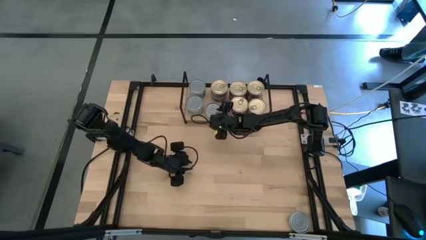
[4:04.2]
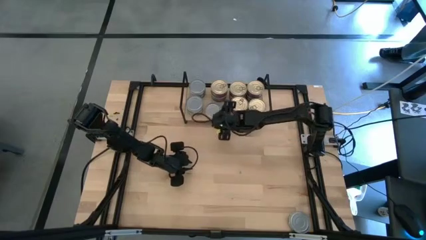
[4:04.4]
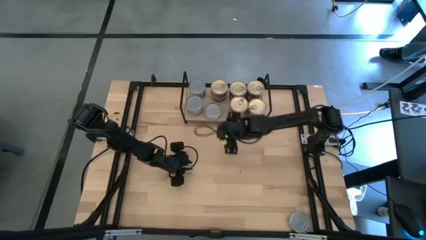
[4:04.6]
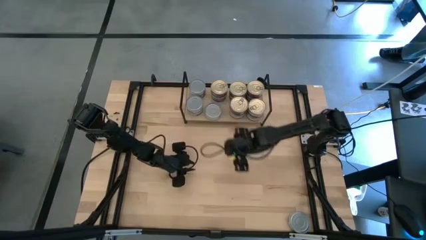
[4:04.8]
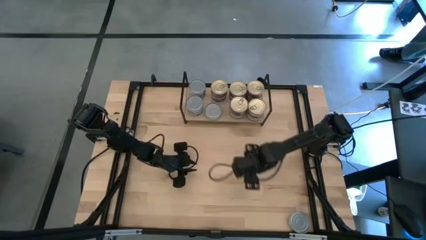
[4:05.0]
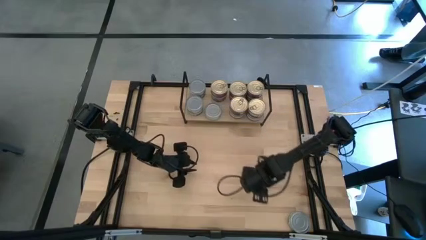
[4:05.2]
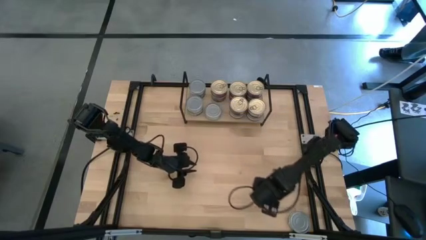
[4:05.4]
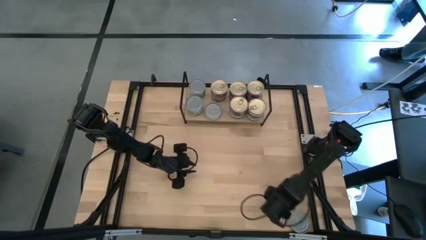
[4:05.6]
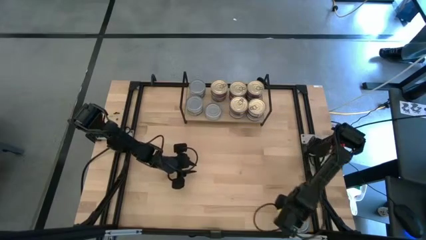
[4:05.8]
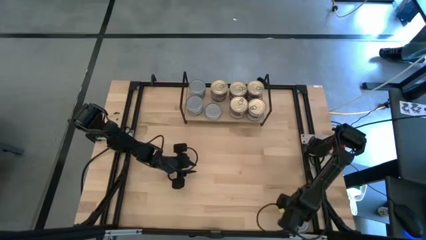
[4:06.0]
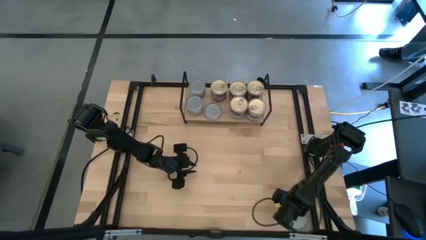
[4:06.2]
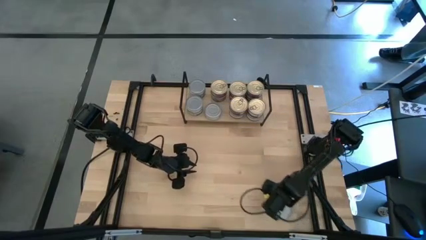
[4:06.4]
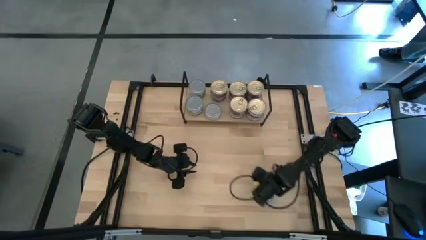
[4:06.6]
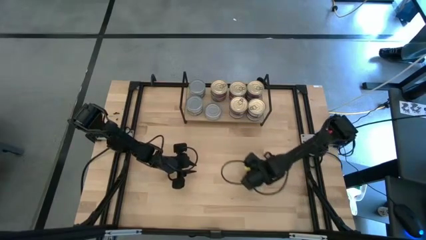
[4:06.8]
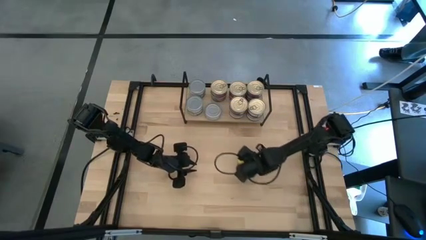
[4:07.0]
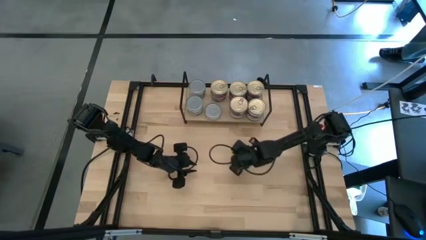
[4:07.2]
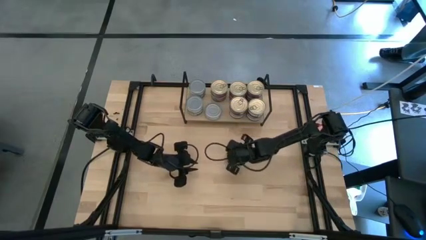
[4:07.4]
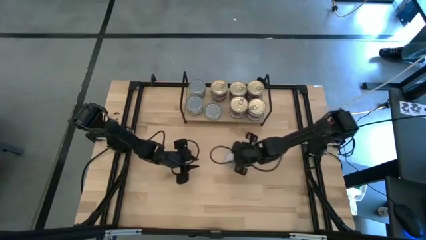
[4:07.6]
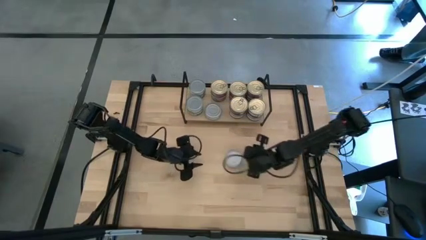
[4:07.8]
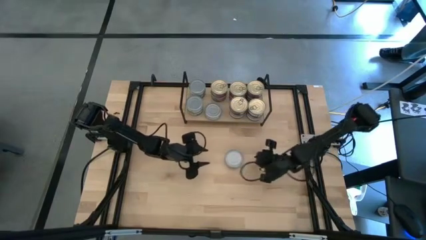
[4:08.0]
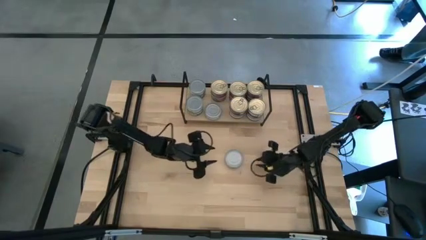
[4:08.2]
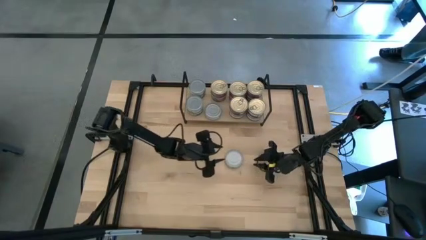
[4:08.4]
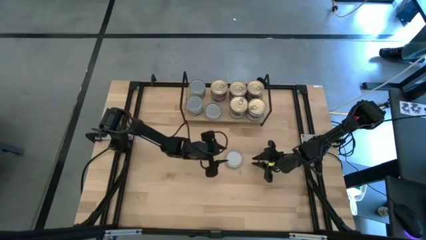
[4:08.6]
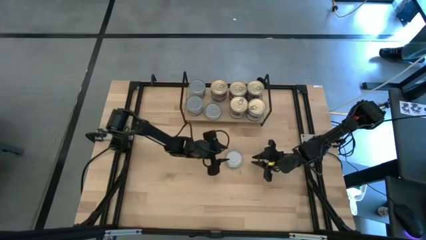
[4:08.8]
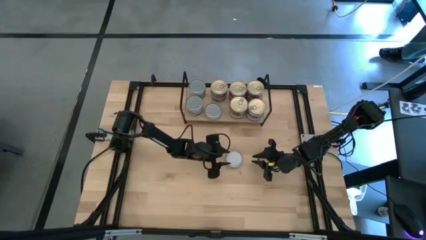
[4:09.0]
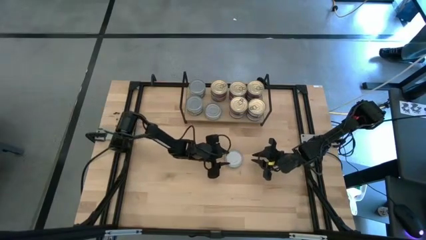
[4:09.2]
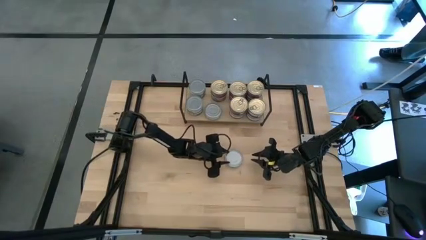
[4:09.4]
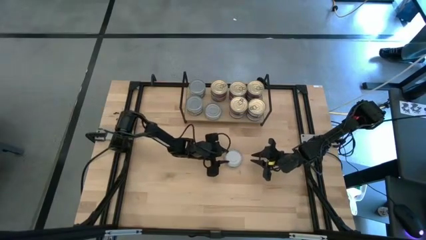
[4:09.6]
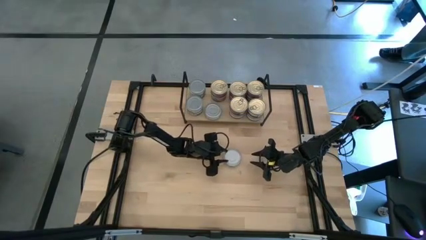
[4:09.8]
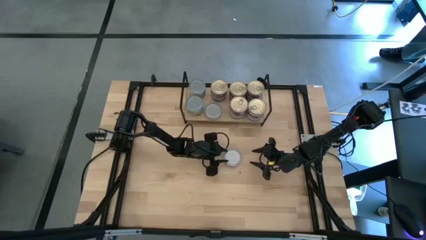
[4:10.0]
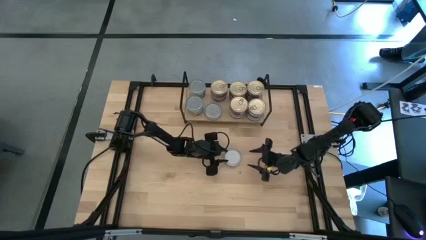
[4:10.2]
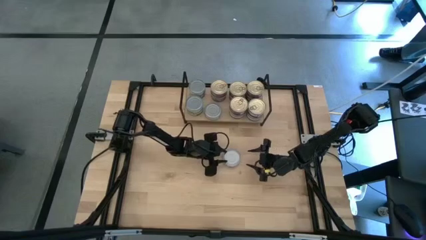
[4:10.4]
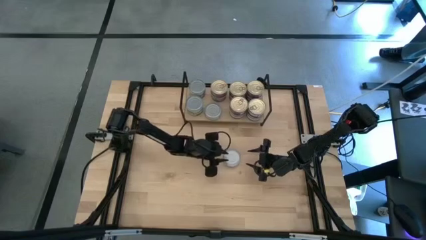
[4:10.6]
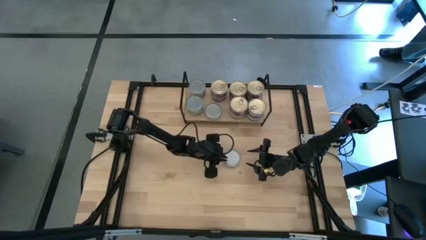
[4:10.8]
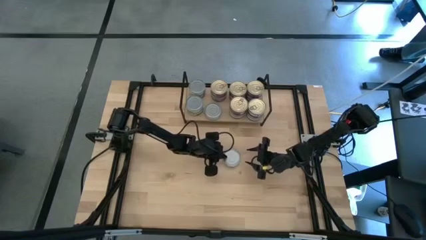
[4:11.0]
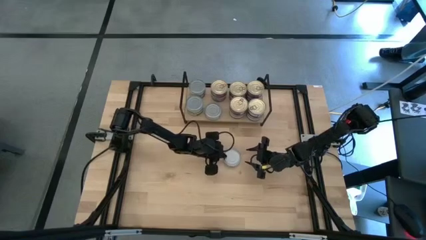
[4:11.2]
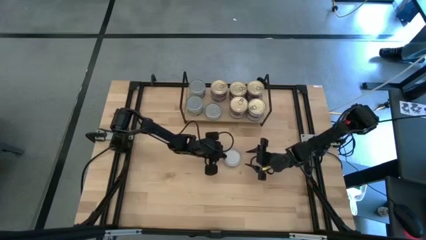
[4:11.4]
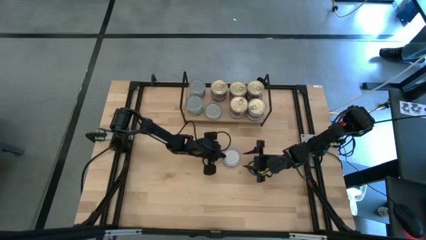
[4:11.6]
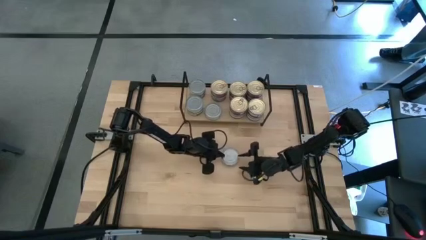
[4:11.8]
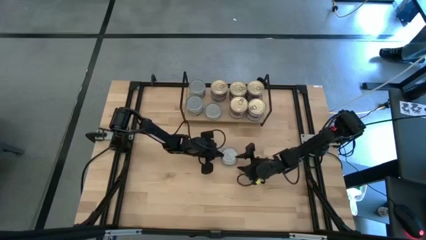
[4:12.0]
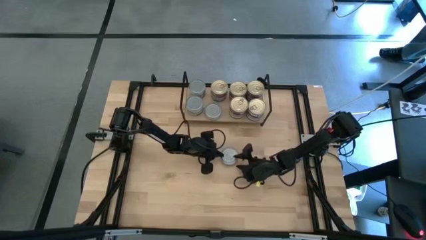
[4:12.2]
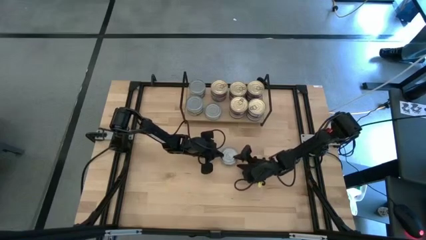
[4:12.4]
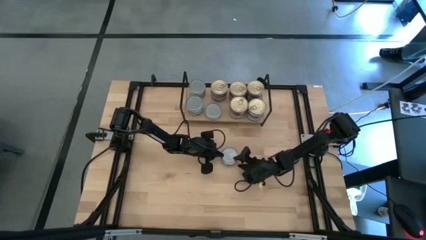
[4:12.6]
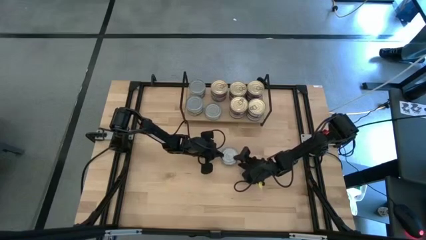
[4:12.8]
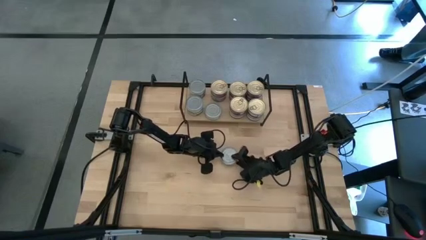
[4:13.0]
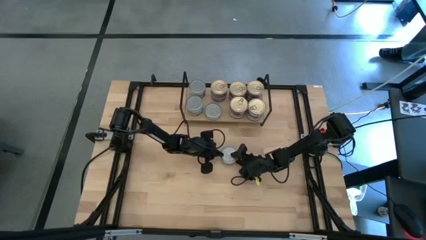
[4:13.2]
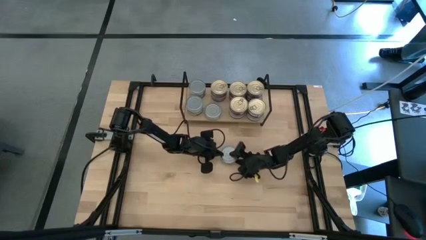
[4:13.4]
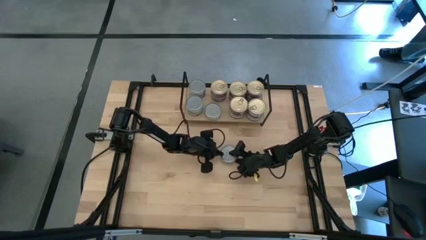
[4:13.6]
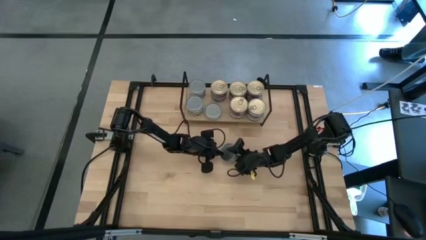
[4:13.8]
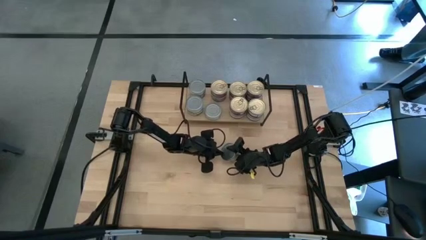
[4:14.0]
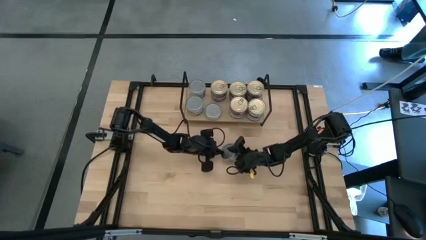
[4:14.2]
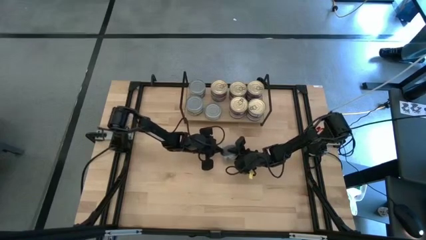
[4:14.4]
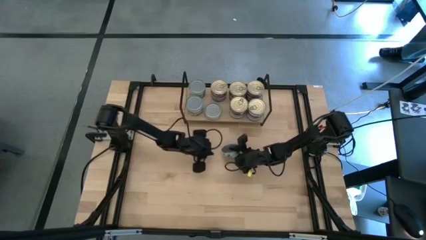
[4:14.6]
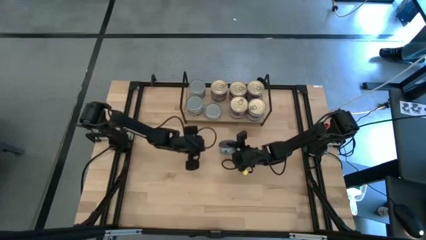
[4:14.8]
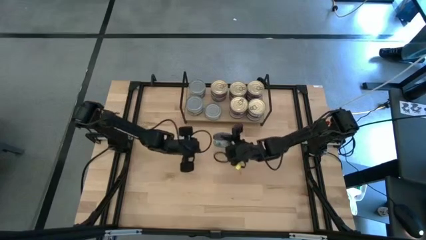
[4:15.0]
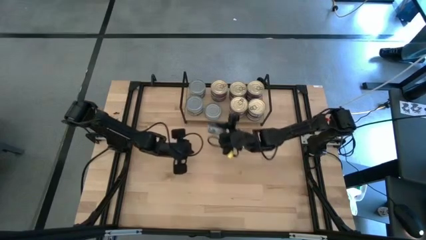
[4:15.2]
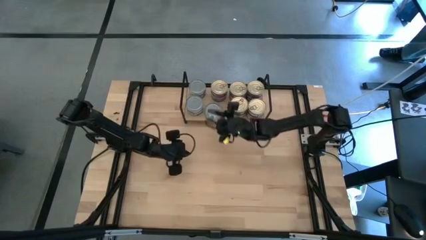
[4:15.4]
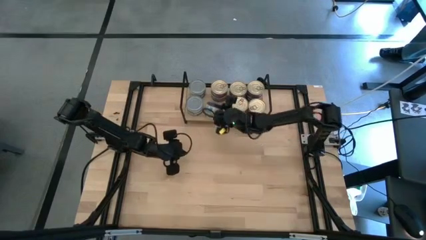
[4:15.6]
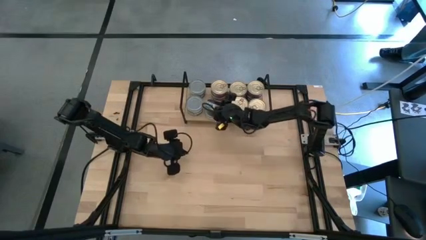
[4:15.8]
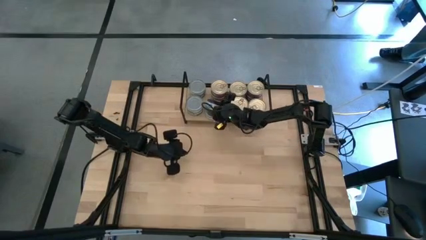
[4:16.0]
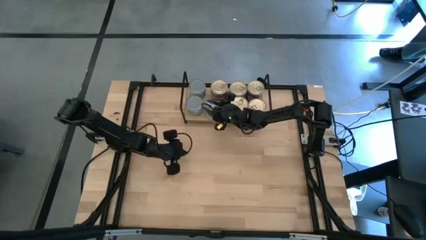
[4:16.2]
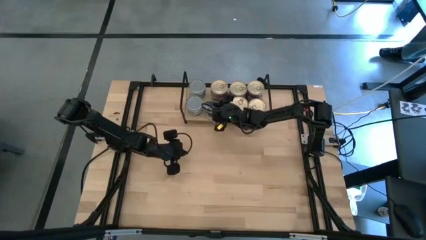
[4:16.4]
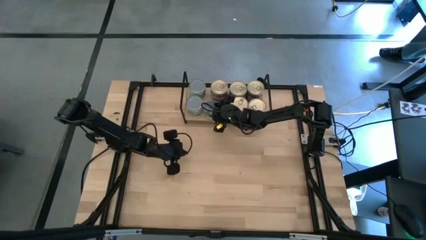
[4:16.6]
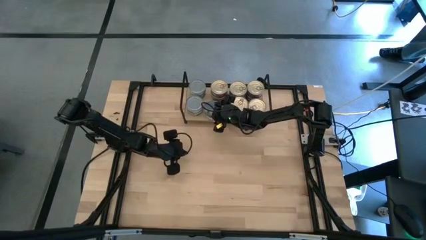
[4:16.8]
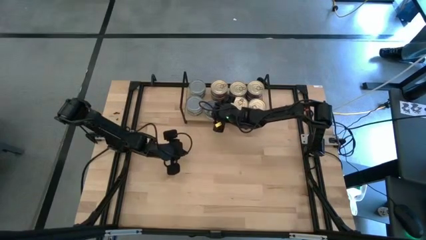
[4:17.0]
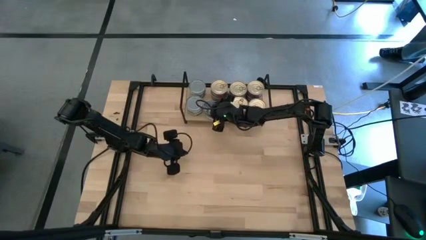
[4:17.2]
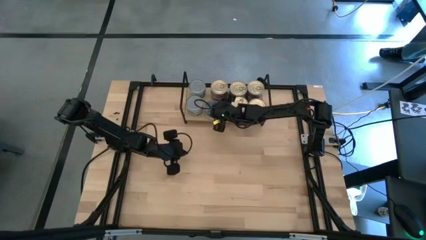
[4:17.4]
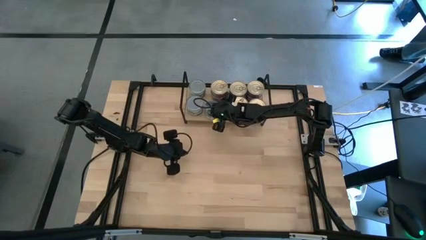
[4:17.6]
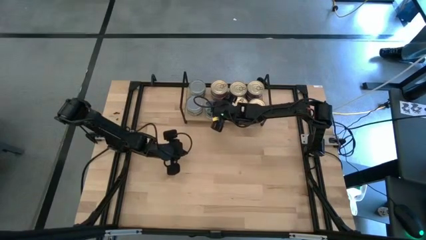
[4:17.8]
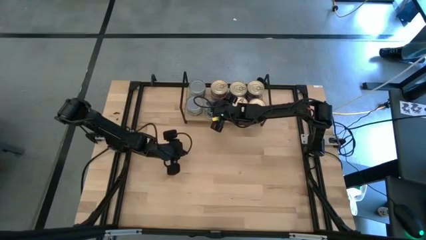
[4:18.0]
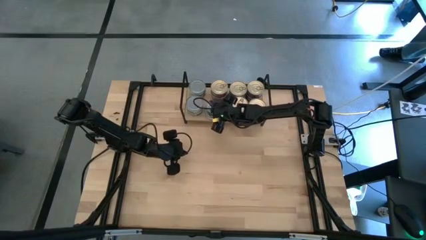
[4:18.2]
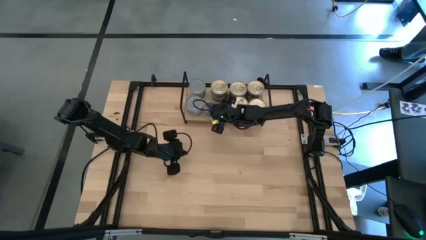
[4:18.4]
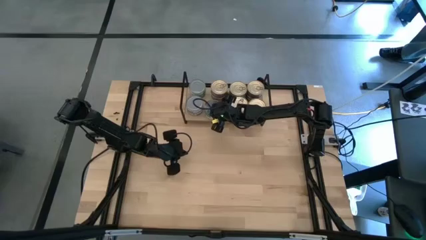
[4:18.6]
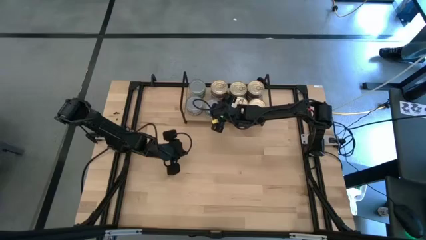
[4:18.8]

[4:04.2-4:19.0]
Task: Stack canned seafood by type on shelf
Stack the green tuna can on top of the other green tuna can on the shelf

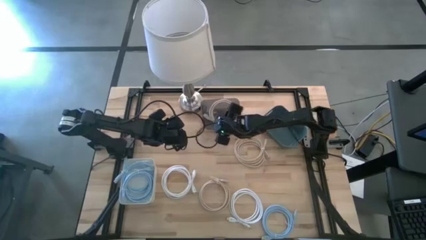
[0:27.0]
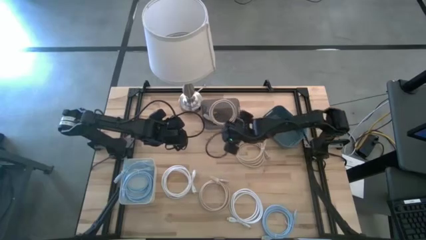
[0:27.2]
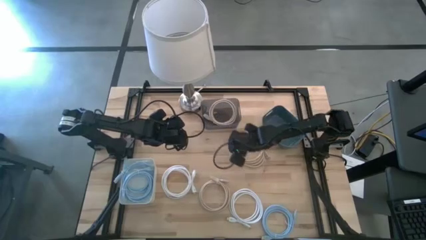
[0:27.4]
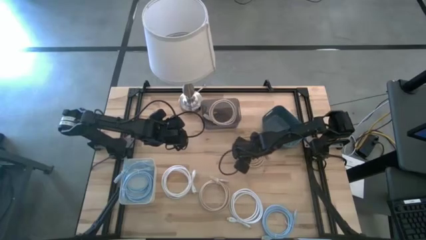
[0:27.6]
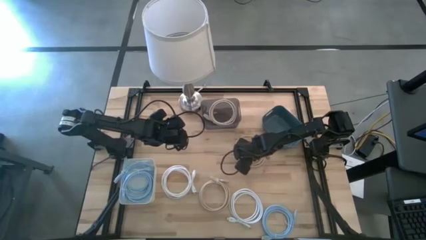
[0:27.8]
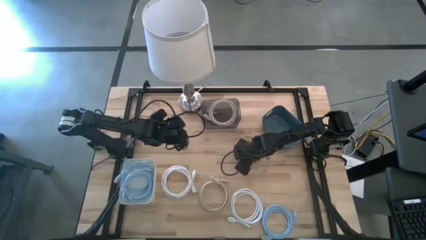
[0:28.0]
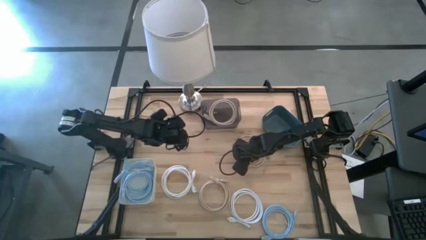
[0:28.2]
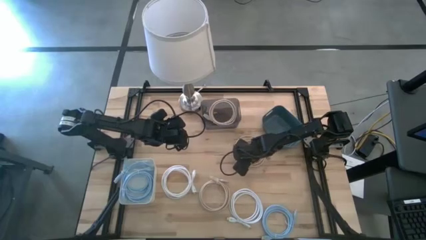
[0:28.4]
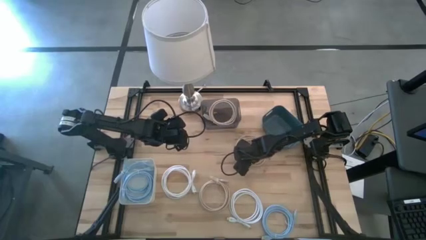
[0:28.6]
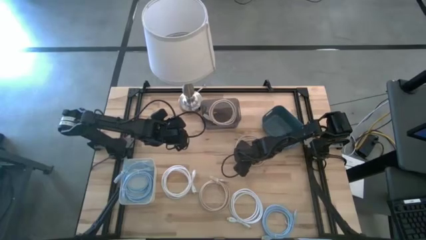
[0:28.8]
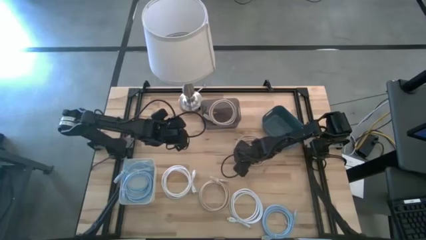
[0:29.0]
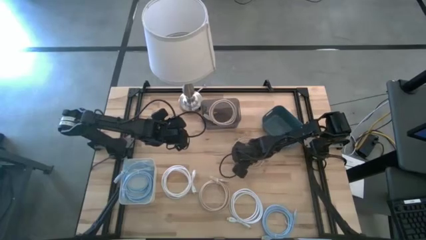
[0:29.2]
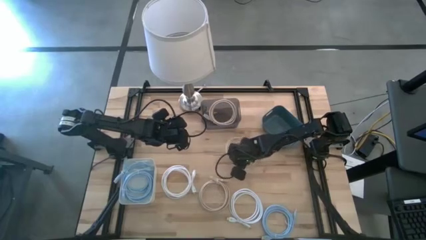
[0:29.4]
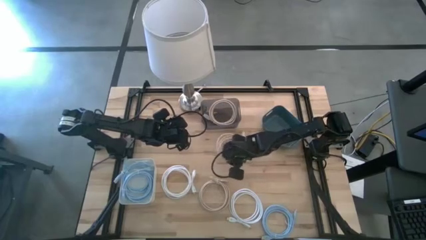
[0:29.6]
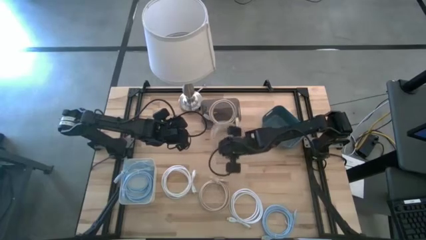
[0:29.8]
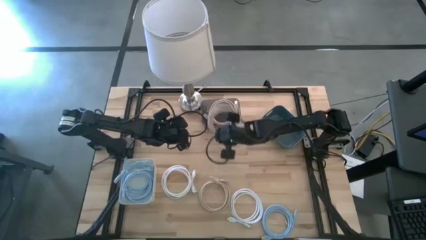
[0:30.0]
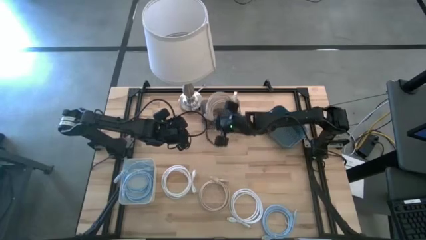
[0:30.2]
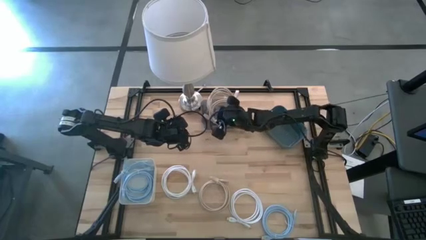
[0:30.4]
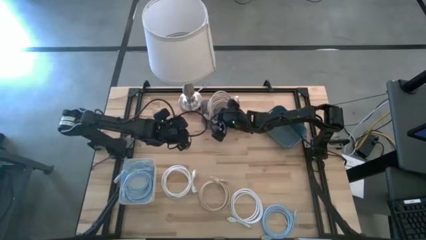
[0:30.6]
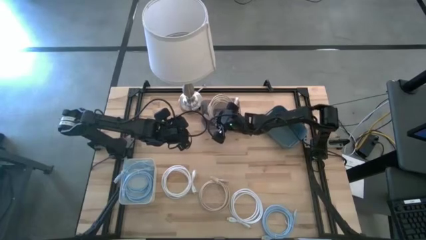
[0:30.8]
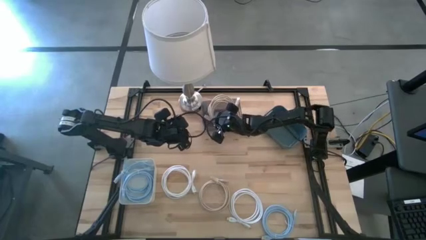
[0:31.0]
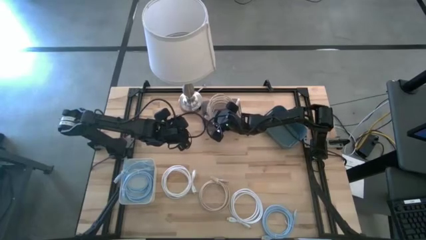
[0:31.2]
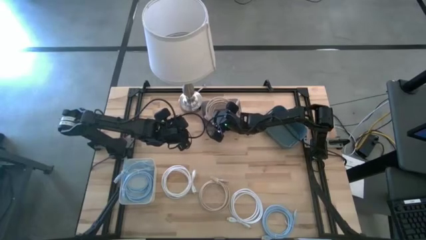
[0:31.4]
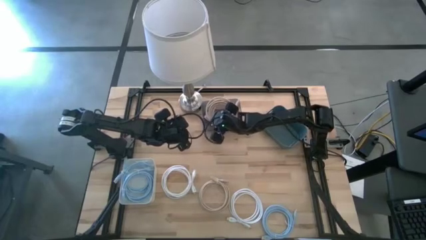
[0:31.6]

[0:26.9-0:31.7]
Task: Sort HDMI cables
Put the top light brown HDMI cable into the black bin
